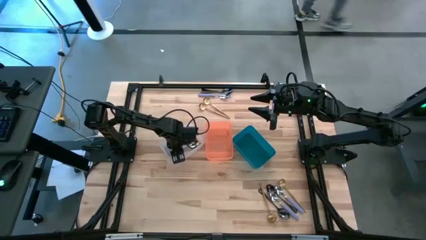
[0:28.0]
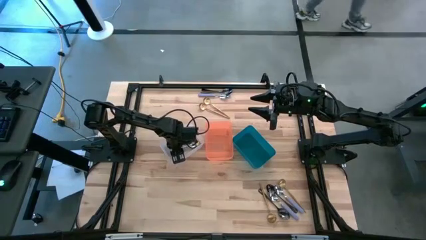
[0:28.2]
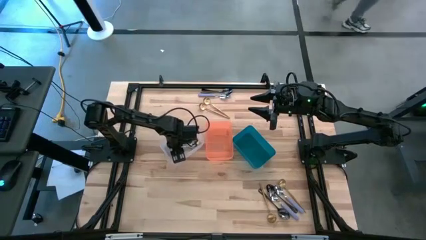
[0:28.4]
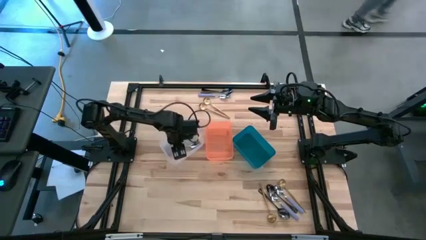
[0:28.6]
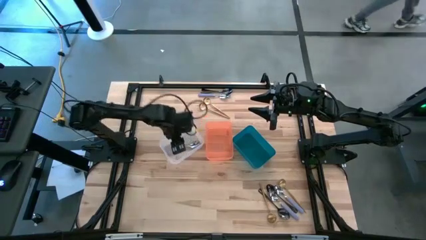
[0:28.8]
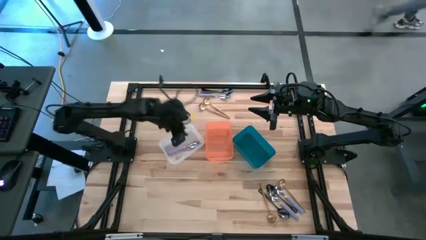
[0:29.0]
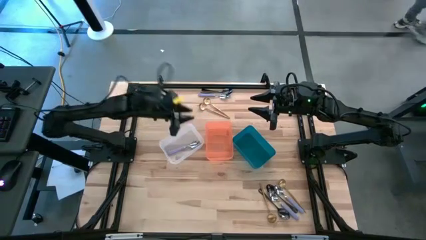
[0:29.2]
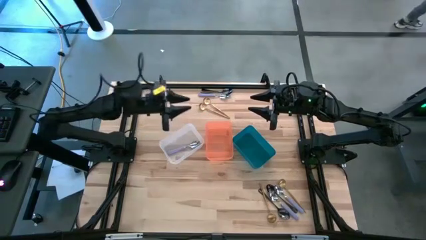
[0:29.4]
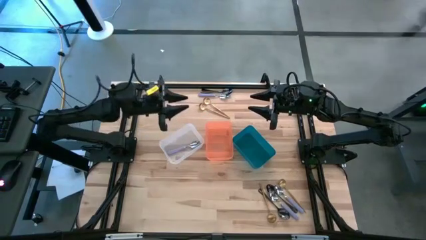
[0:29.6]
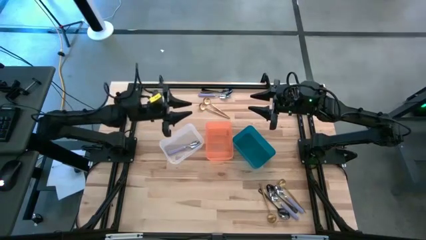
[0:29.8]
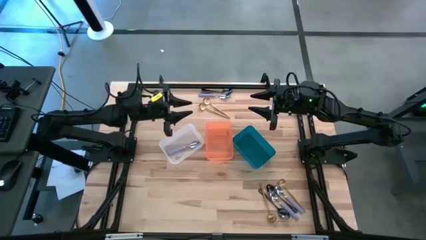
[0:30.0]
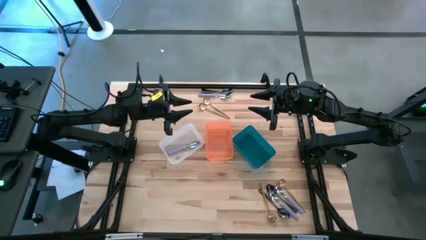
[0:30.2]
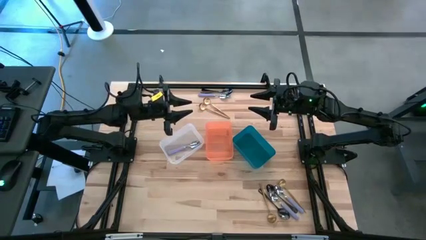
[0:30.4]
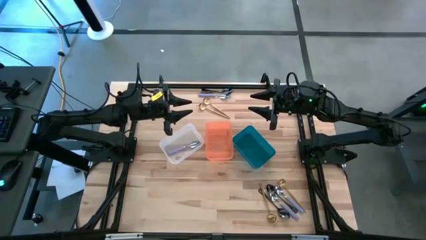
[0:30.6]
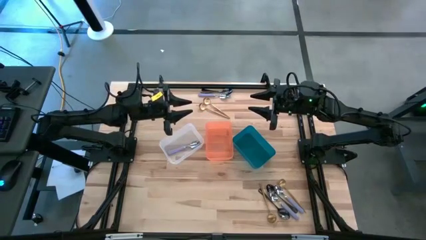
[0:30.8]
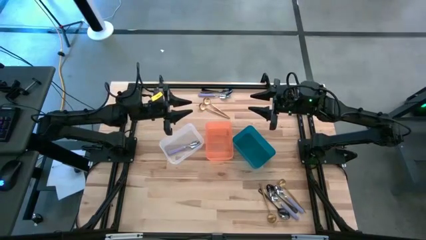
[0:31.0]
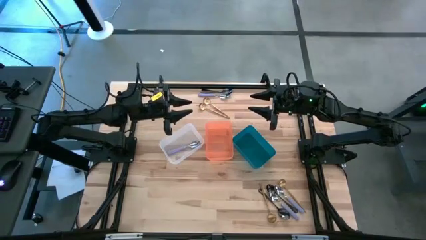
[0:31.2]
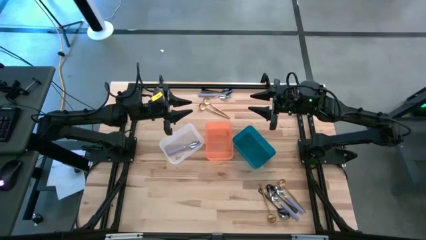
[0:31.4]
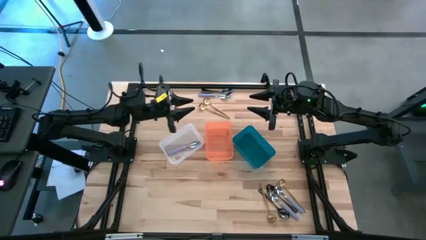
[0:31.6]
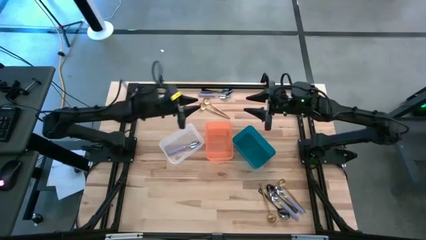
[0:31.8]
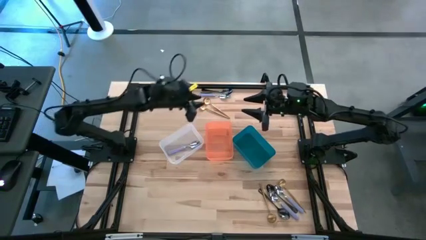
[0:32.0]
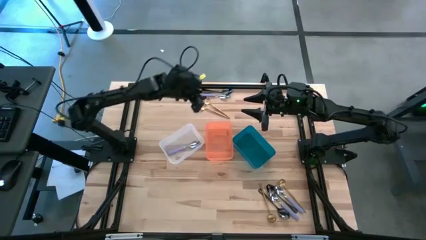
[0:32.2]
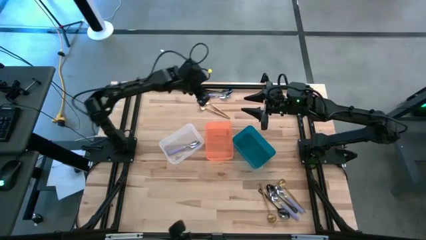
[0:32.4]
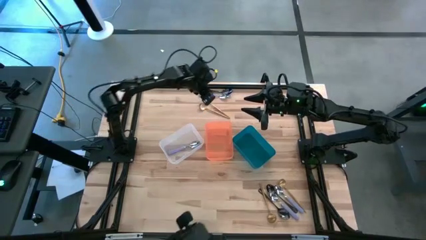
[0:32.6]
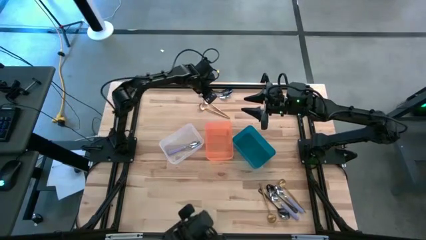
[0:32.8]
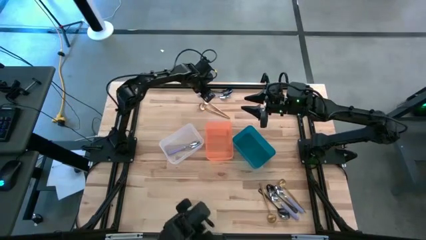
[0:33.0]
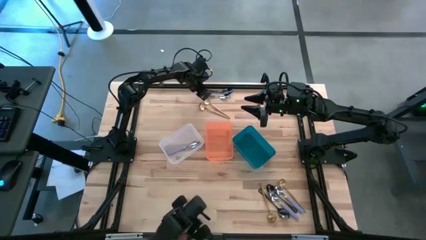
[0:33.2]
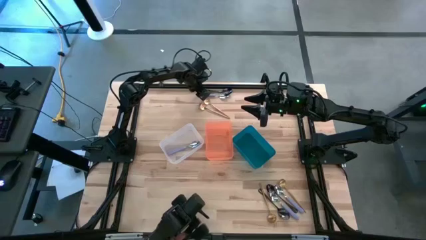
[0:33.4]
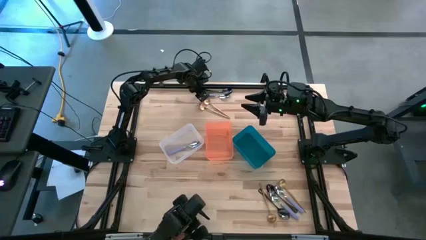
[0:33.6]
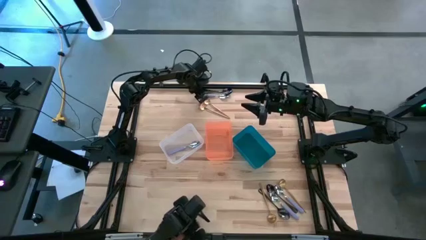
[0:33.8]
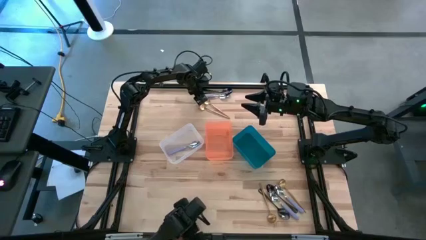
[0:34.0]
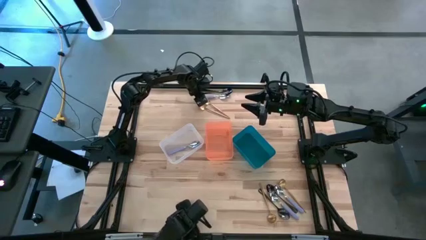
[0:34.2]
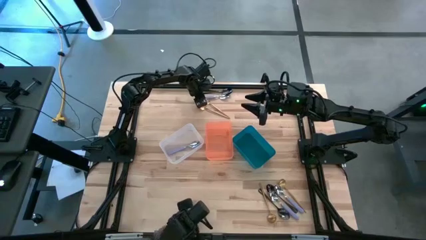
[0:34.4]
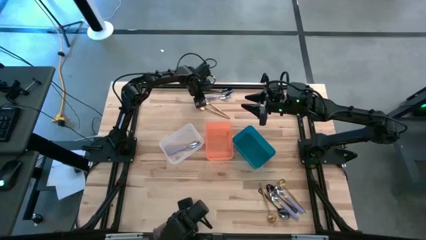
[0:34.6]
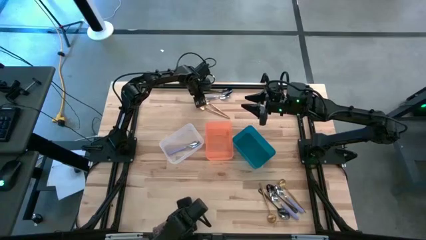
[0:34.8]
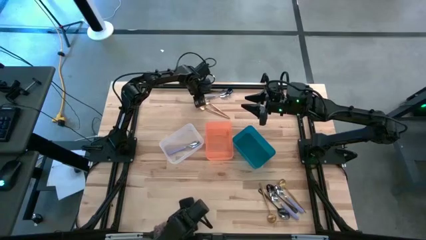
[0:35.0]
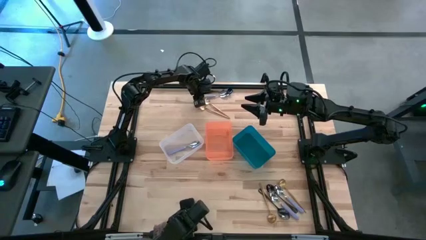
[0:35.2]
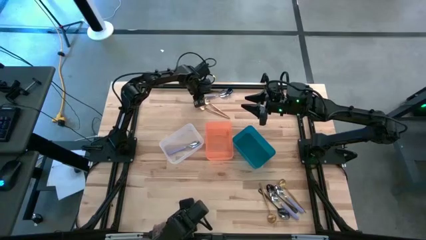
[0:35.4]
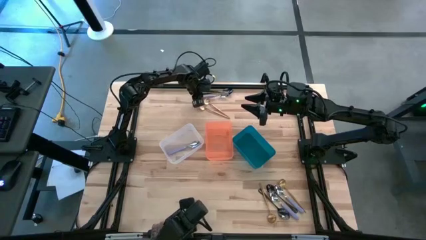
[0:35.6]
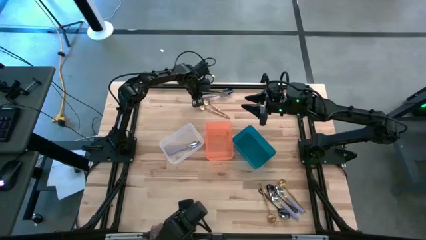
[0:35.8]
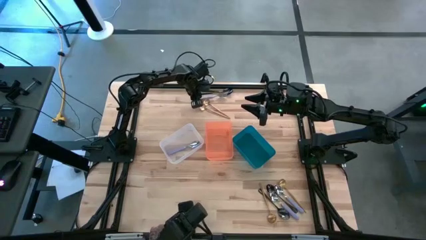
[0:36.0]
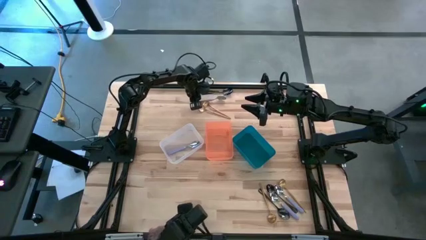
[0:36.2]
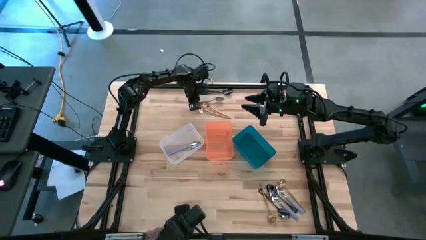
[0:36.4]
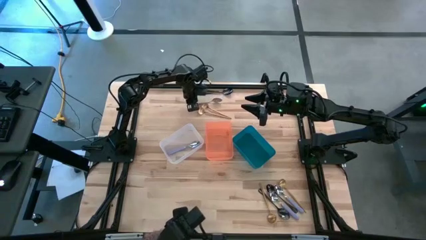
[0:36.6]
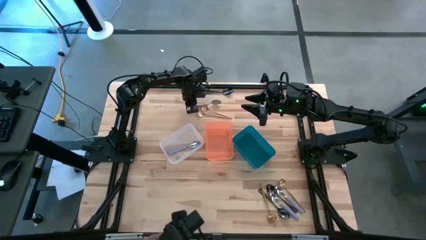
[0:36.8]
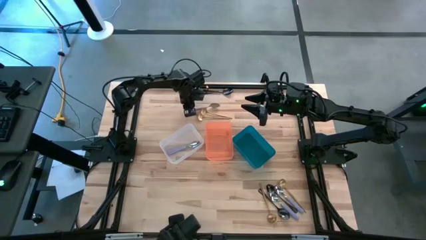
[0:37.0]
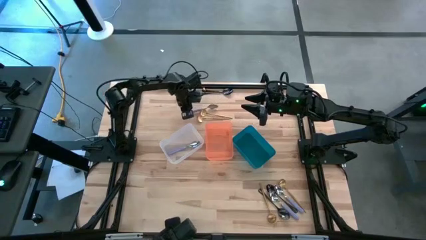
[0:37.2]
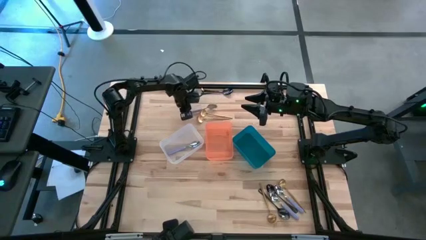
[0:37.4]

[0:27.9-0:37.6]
Task: Sort silverware by color (type)
Put the purple spoon into the white bin

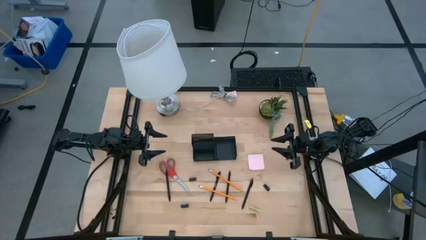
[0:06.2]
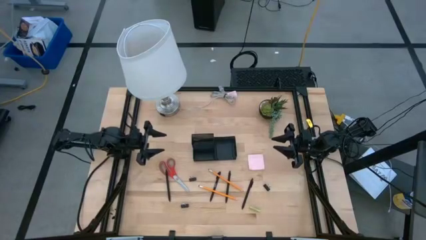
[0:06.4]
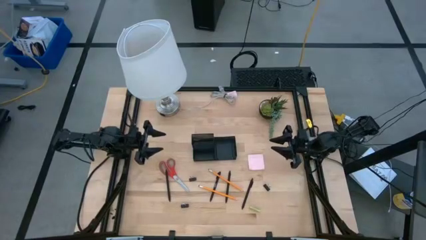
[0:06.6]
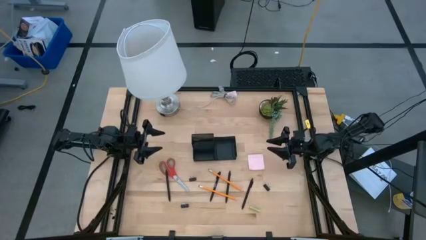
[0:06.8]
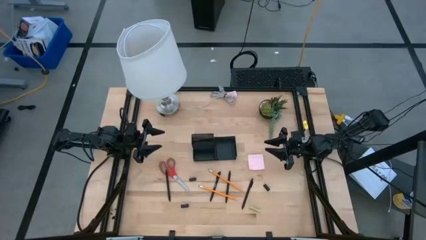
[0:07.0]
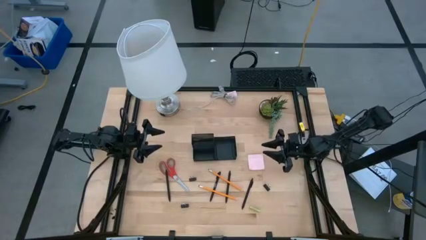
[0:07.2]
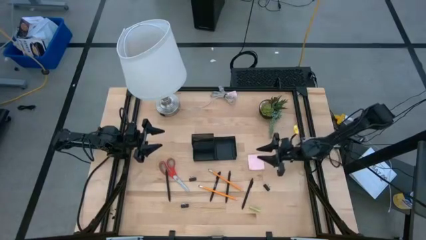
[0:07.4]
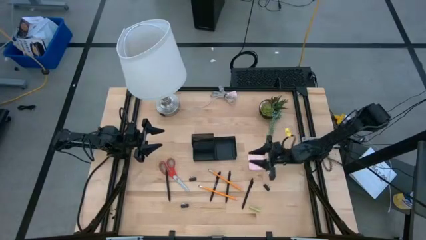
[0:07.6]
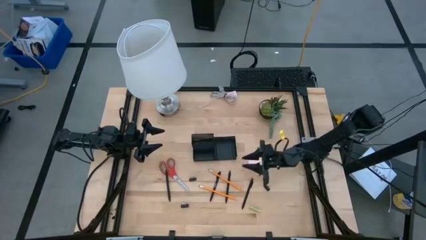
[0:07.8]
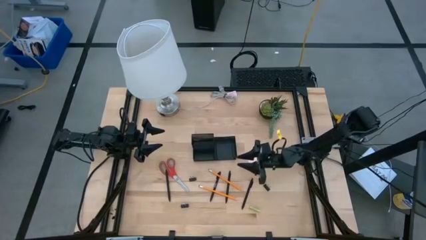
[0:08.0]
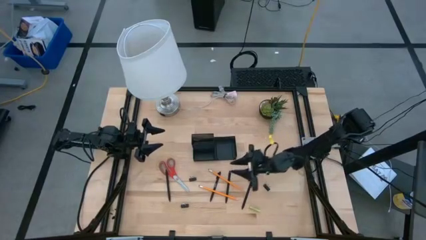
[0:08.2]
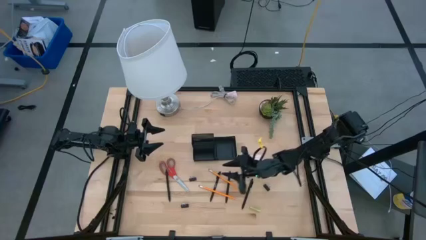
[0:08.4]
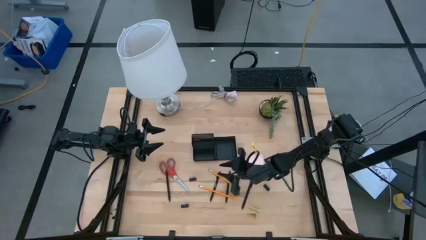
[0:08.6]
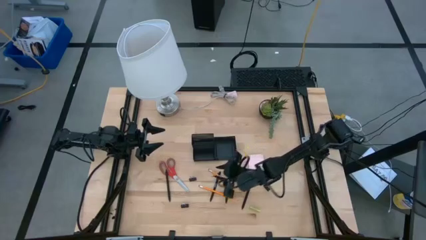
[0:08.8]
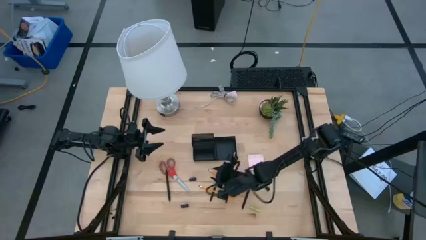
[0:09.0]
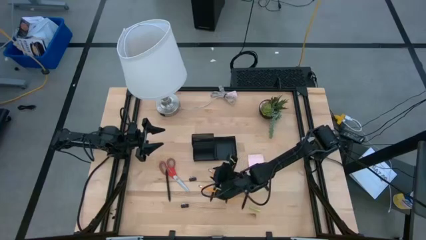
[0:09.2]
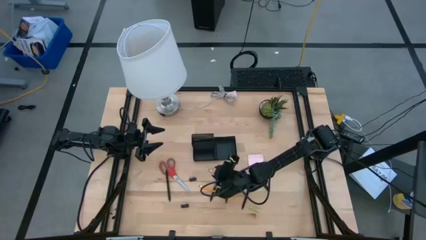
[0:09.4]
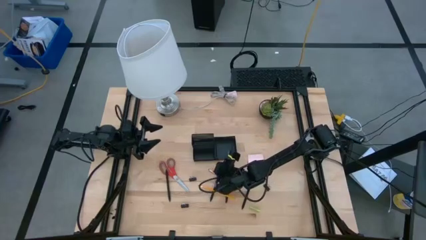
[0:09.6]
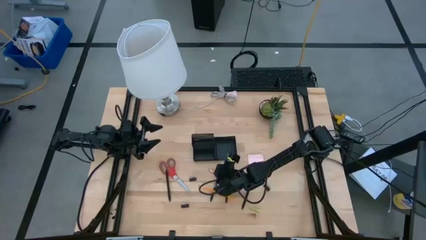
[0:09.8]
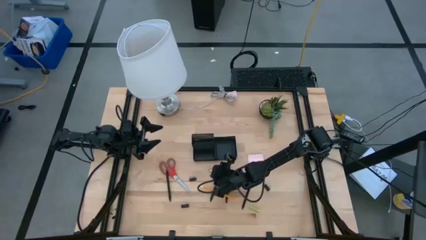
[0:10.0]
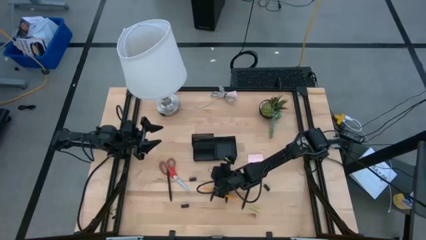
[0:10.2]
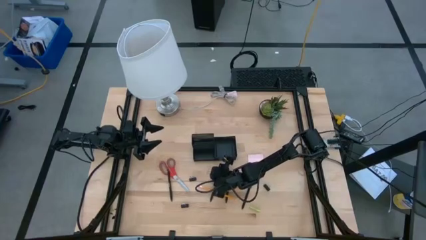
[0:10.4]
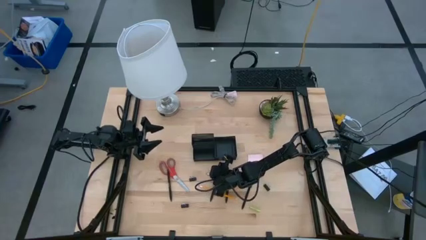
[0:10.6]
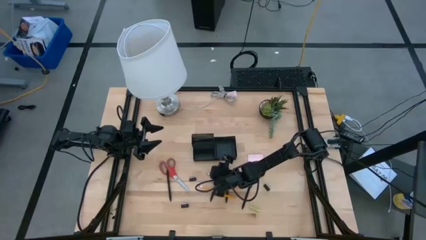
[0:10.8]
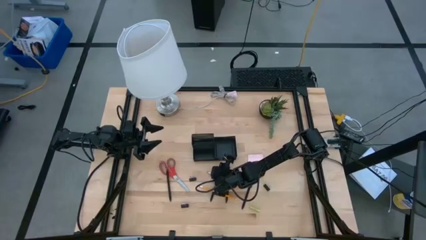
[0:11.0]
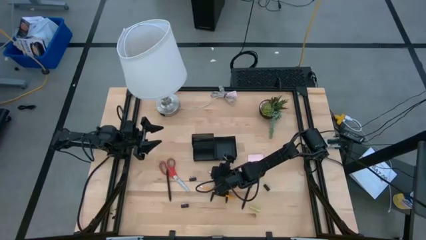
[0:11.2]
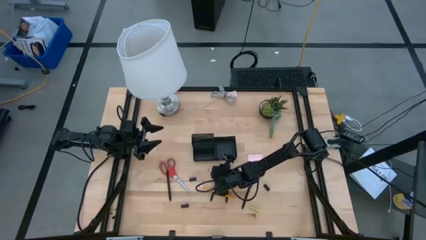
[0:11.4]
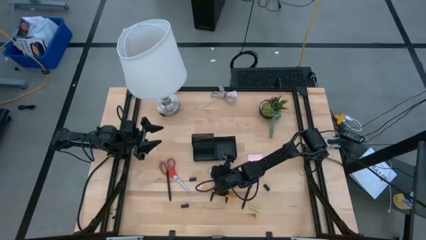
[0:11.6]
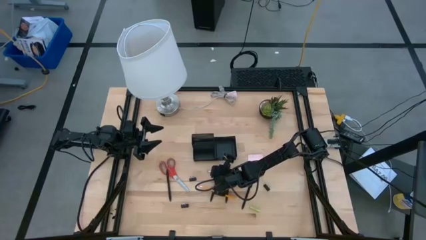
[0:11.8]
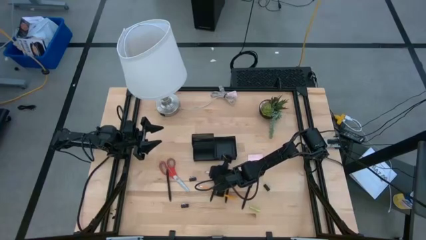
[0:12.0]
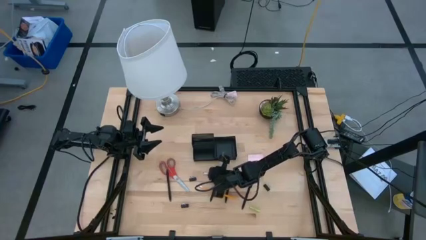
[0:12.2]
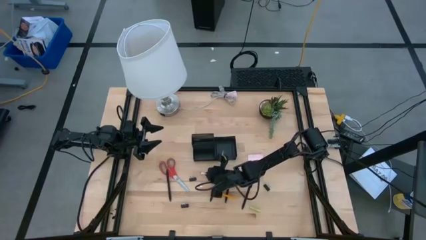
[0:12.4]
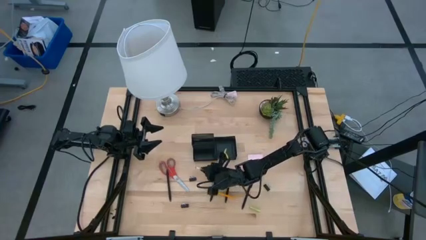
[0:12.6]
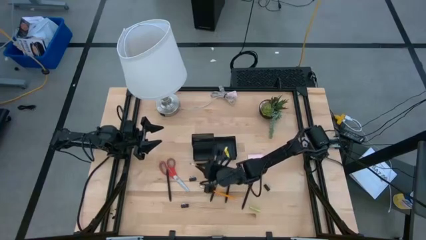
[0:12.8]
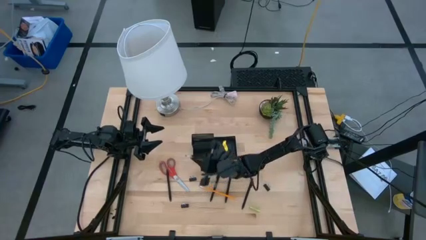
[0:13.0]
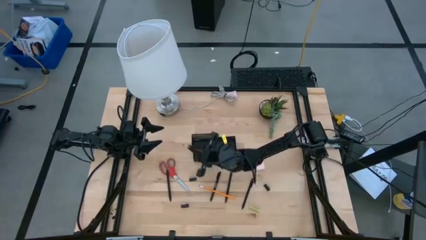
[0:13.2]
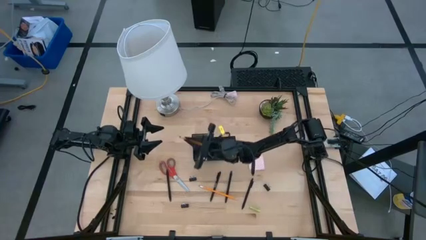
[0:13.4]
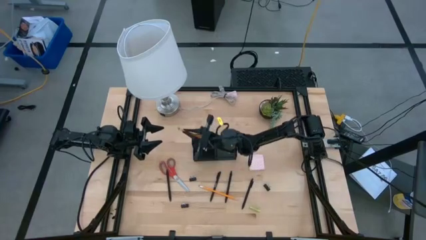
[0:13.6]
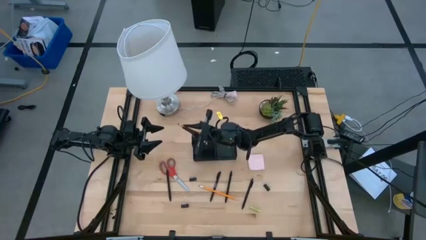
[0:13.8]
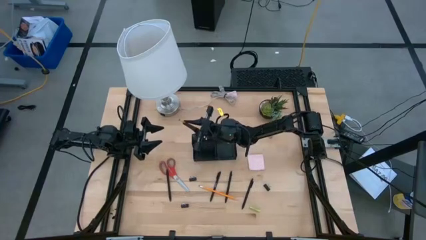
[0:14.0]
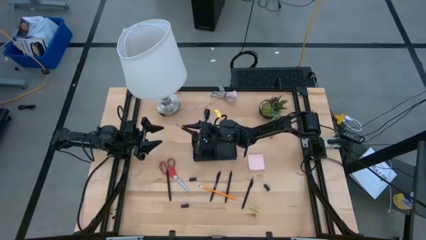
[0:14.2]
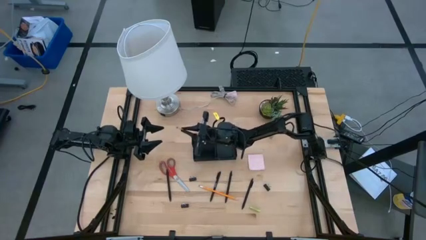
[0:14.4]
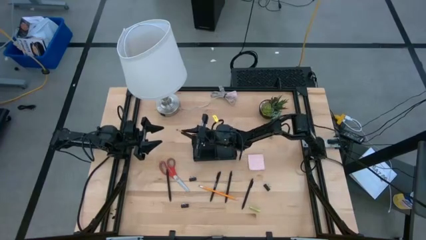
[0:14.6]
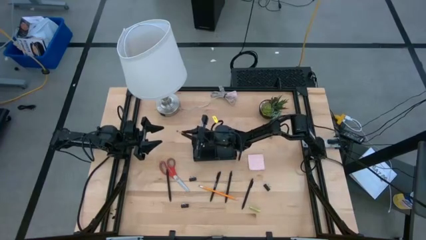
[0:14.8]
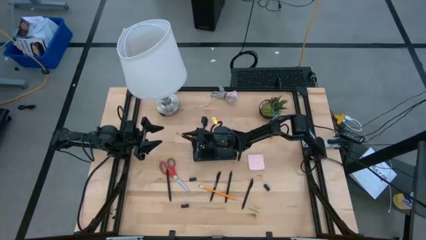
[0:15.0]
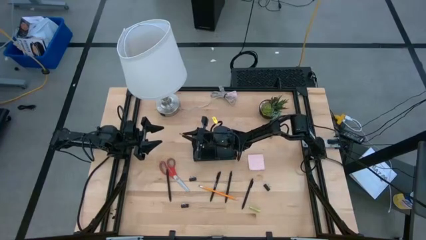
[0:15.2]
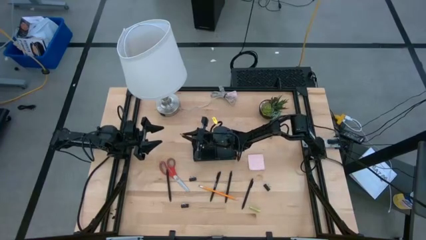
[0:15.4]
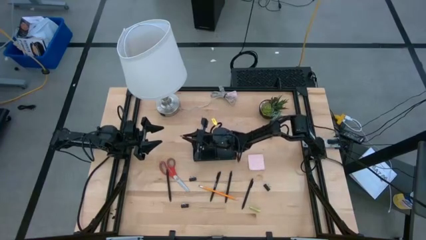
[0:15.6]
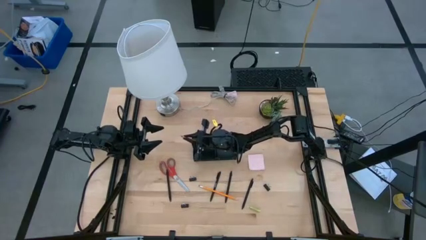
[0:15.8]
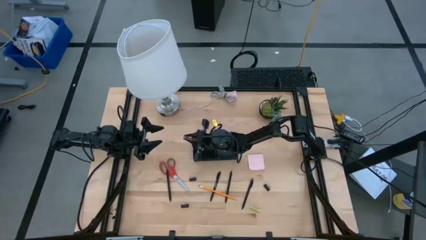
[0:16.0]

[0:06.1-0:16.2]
Task: Pick and place office supplies into organizer
Put the orange pencil into the black desk organizer
